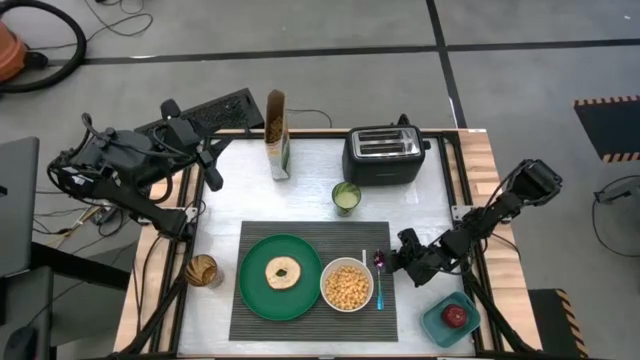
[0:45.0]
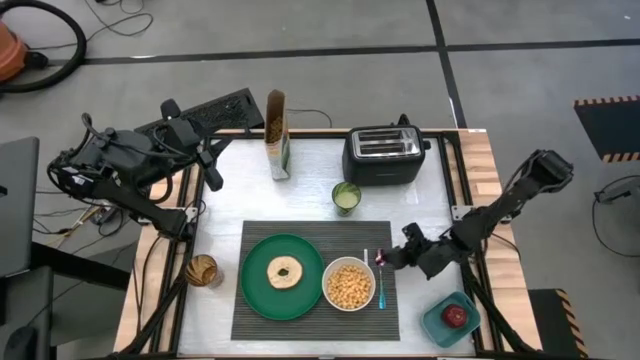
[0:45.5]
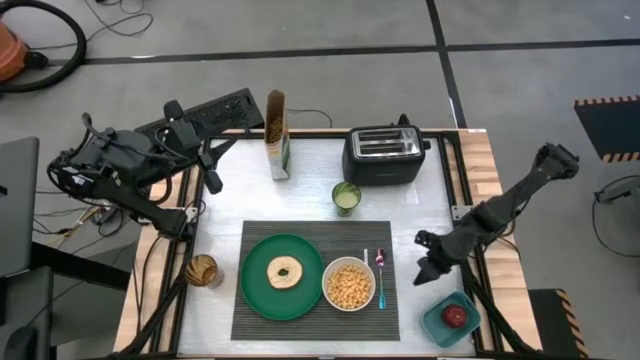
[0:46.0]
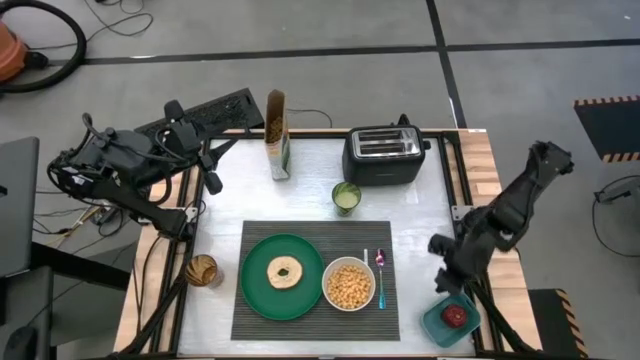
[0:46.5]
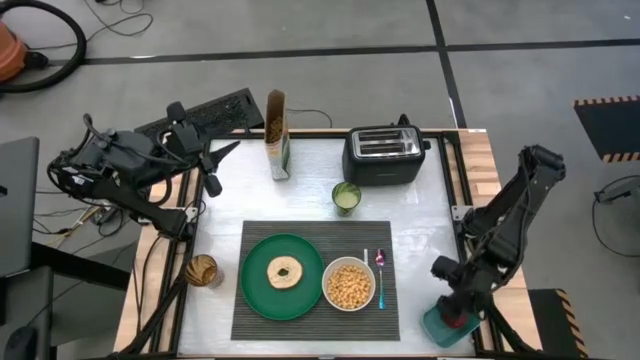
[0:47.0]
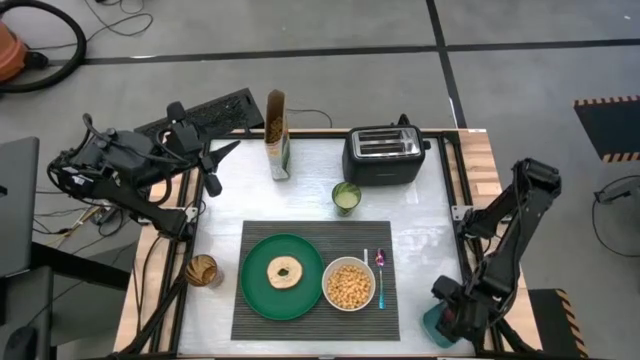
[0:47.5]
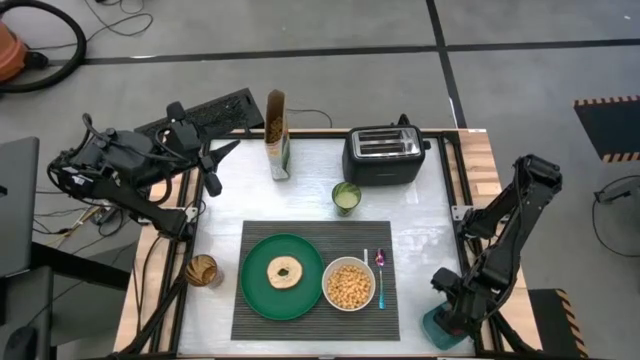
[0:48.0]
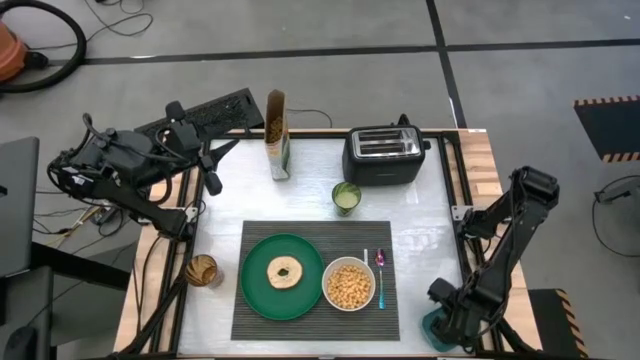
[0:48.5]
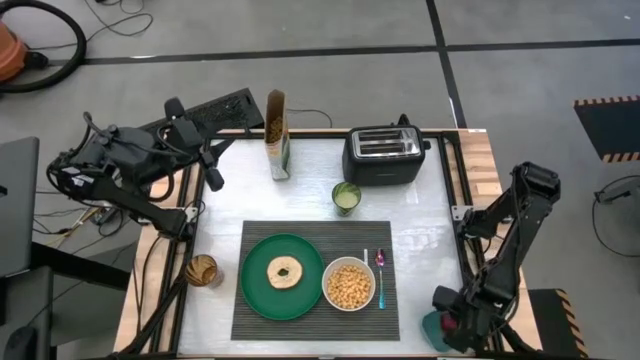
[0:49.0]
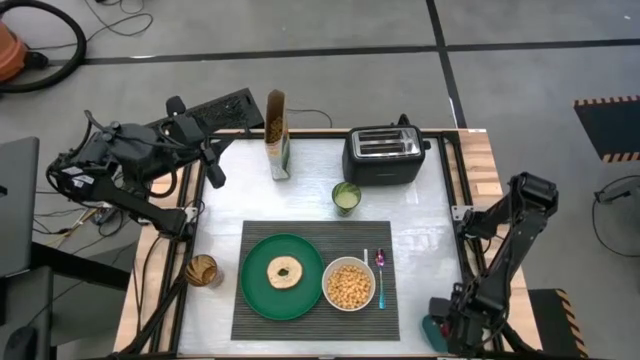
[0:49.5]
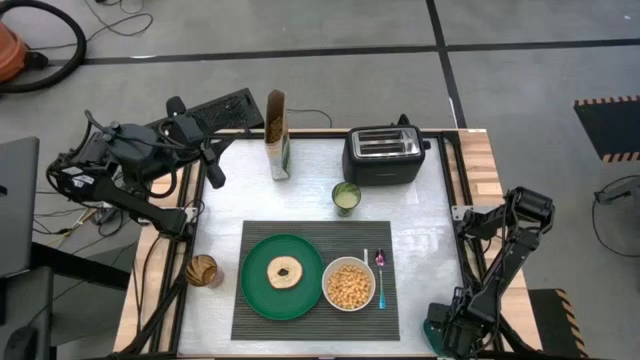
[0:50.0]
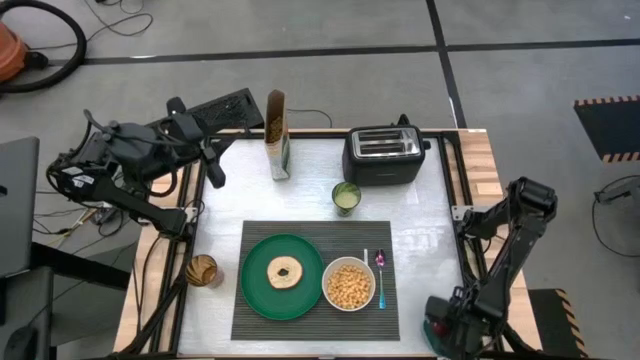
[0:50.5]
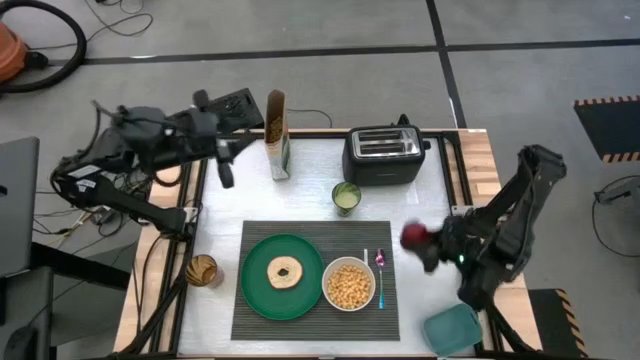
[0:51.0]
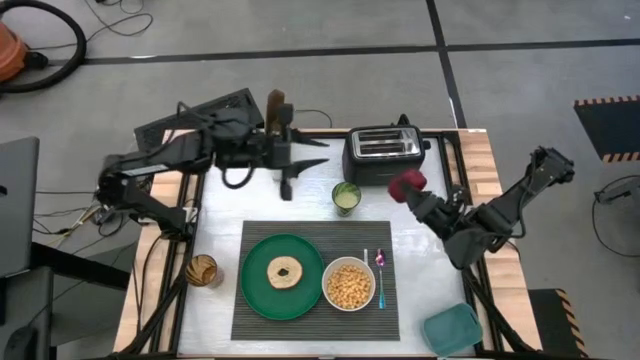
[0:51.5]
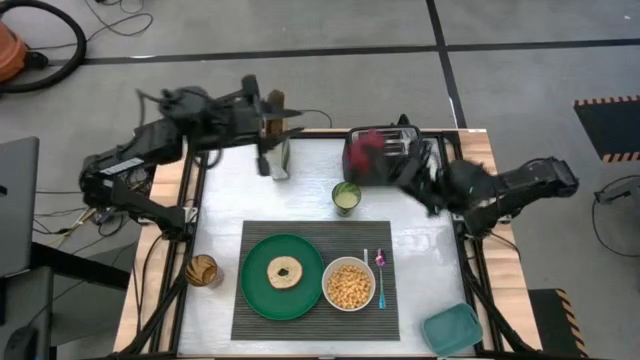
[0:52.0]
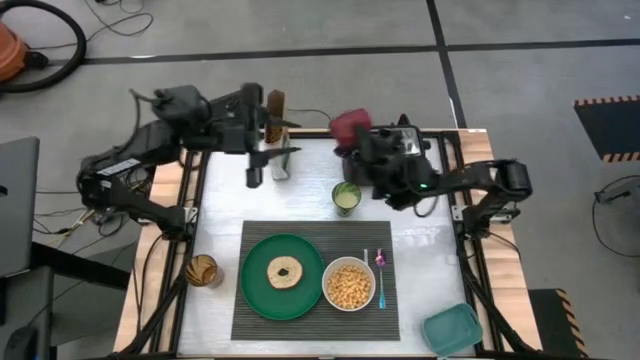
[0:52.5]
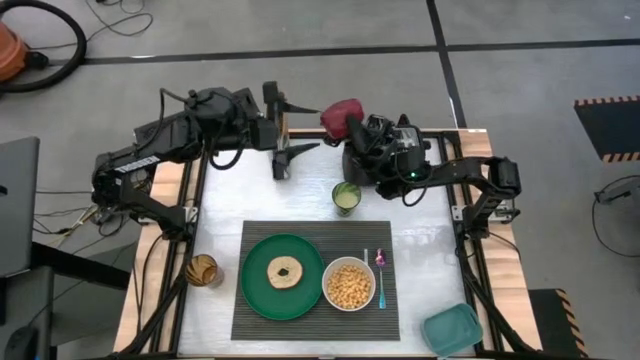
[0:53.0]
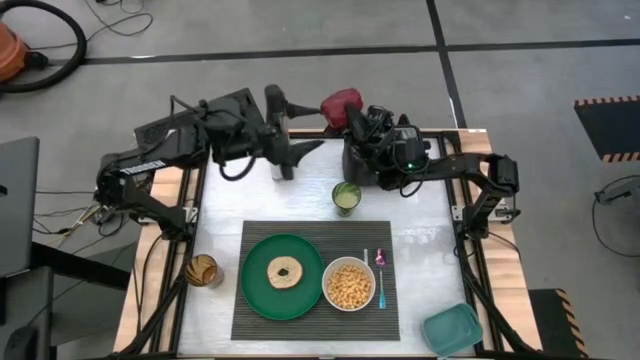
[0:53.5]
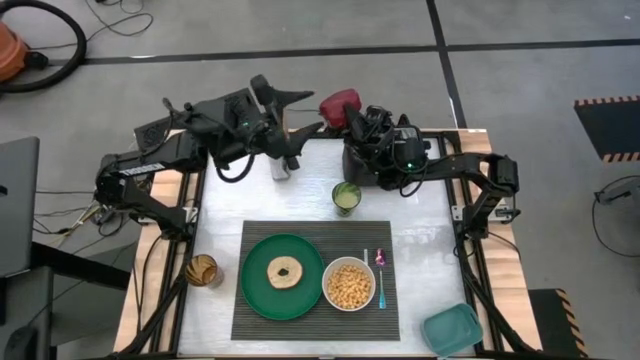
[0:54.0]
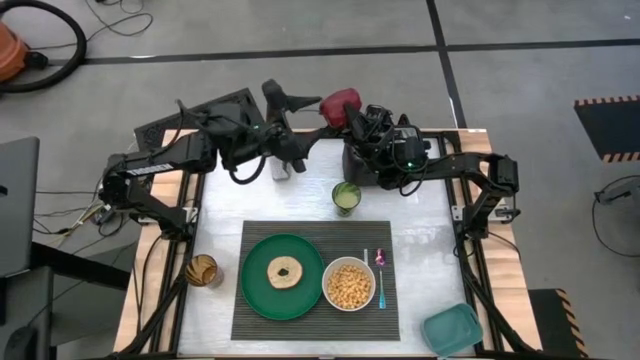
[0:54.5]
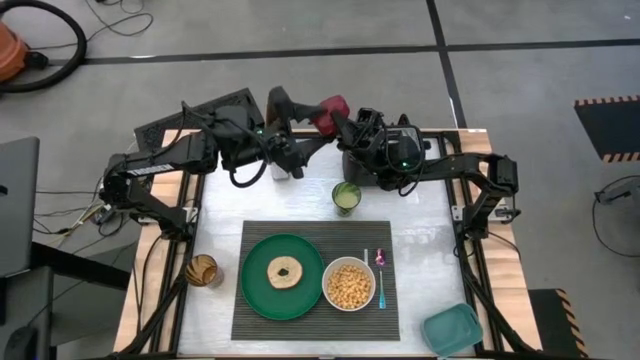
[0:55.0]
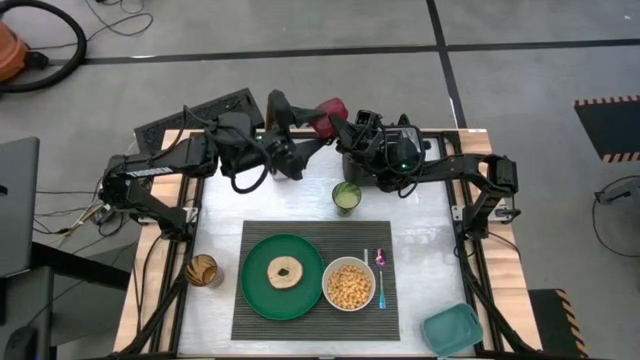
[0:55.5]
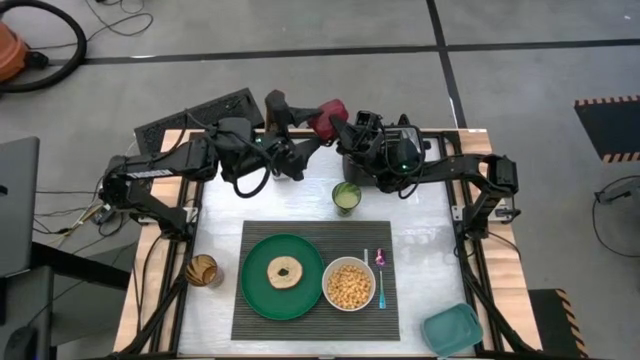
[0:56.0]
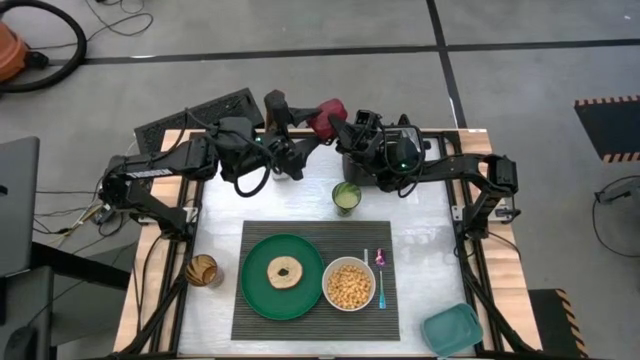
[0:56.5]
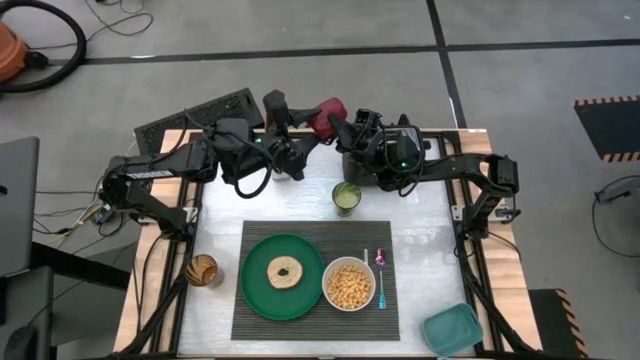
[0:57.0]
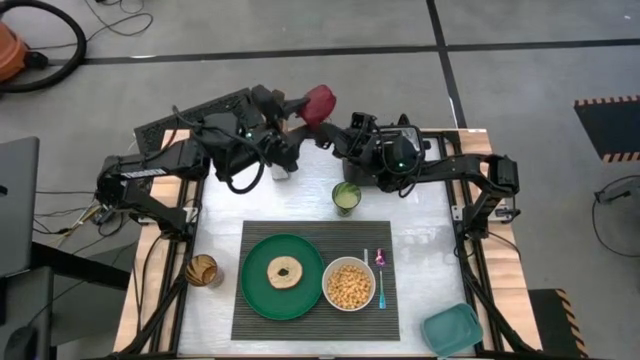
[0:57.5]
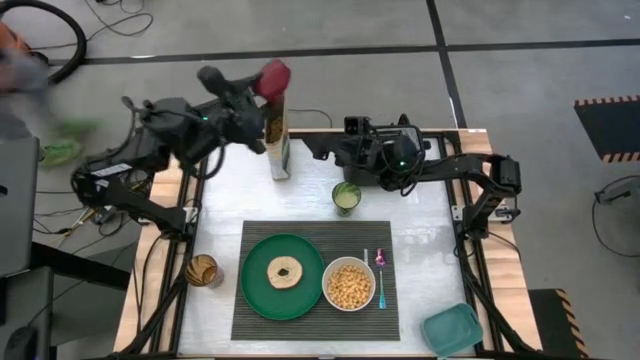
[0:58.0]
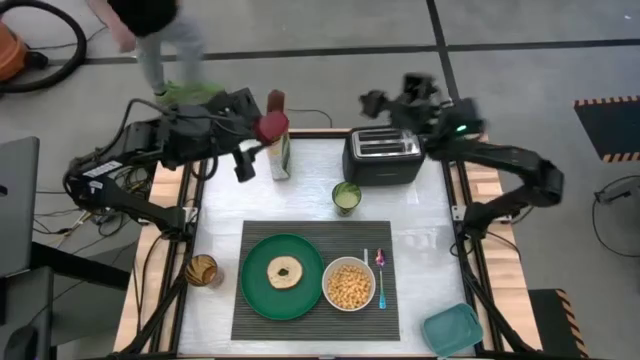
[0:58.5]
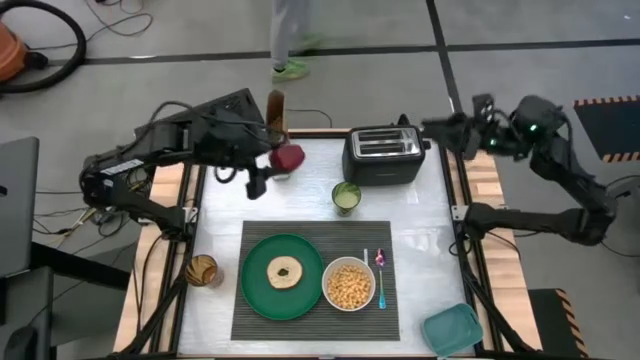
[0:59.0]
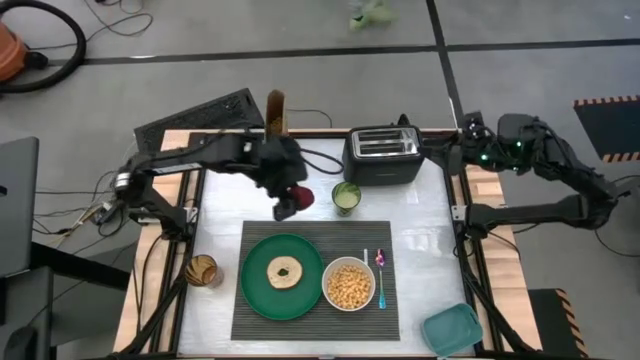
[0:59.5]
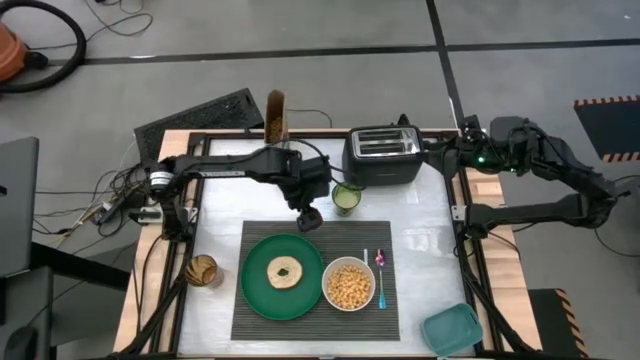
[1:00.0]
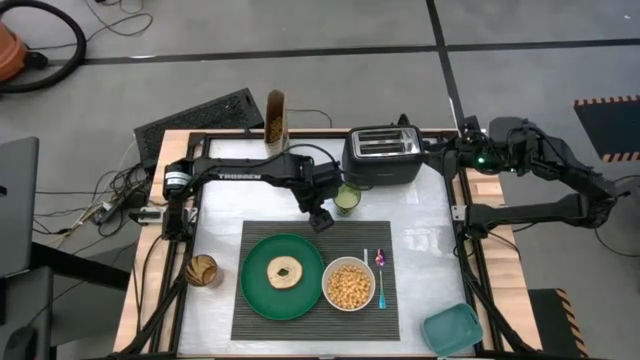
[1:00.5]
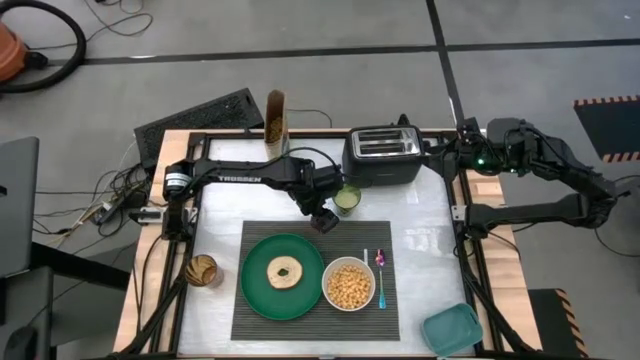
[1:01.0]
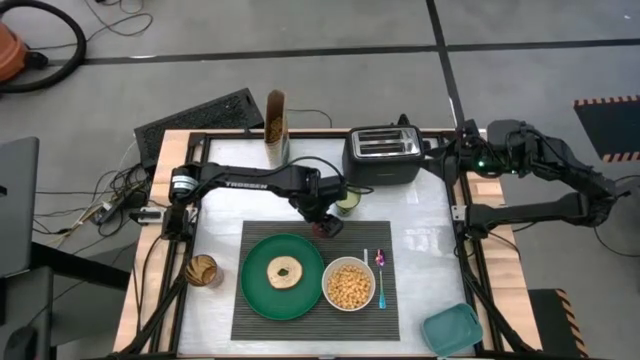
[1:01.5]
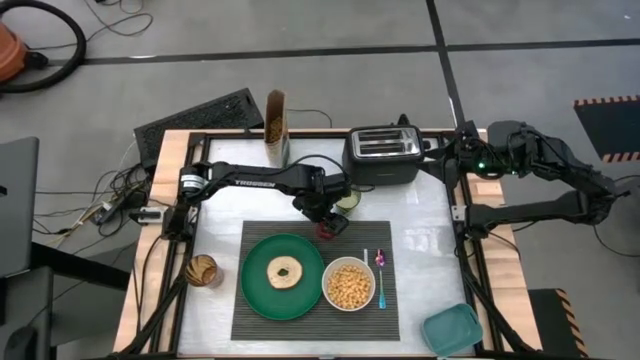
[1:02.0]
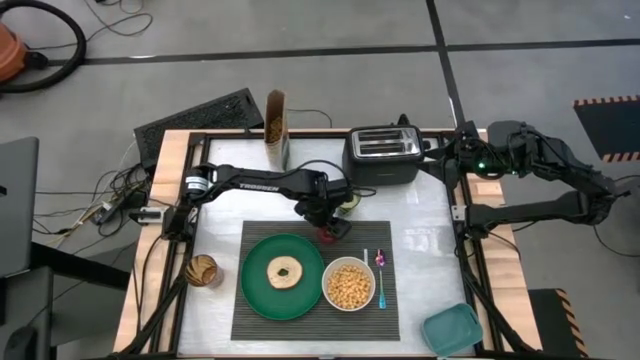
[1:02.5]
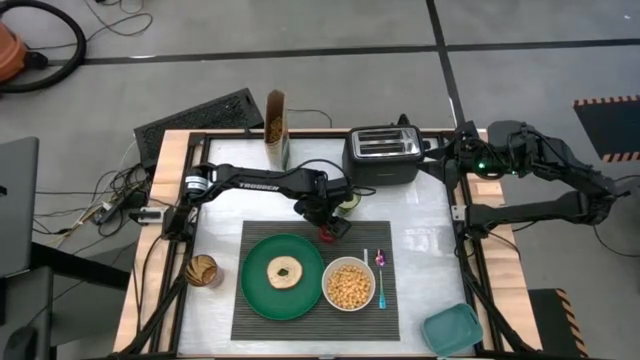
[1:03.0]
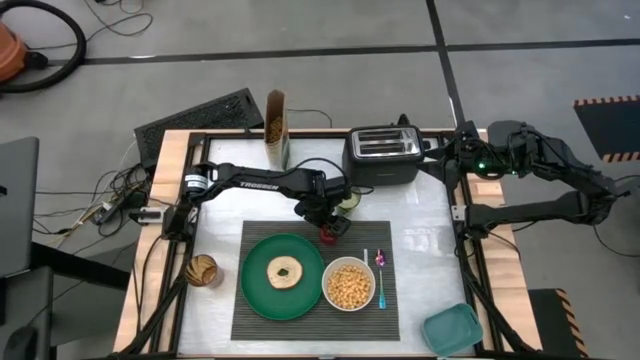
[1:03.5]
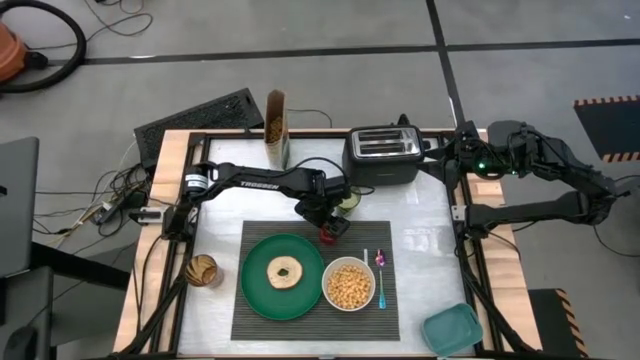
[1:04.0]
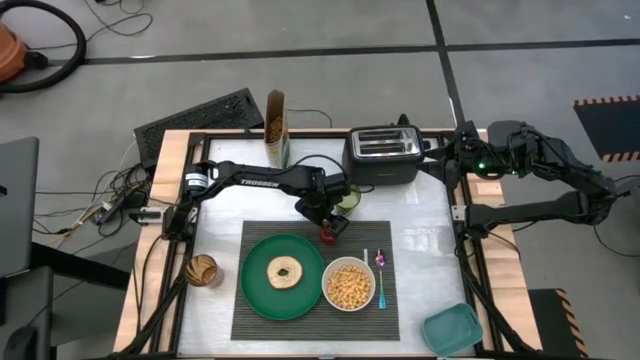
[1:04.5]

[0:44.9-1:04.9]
Task: Arrange a breakfast setting
Put the apple on the black placemat at the top right of the green plate

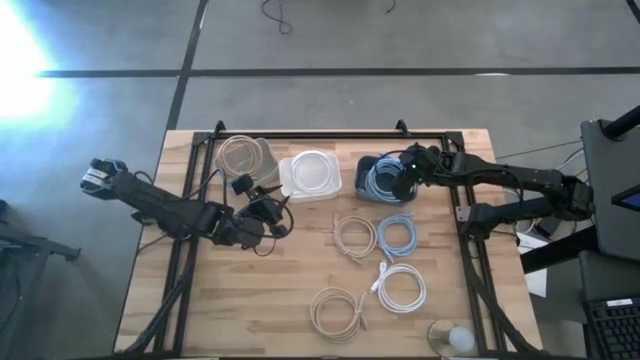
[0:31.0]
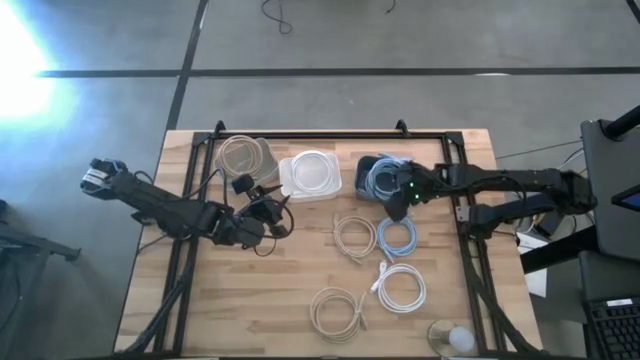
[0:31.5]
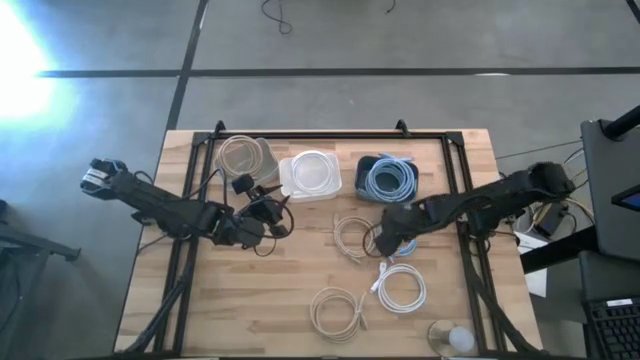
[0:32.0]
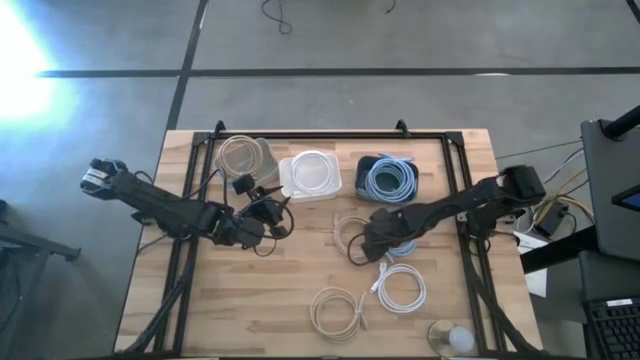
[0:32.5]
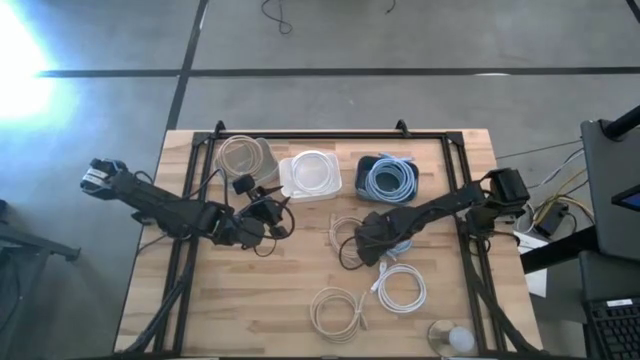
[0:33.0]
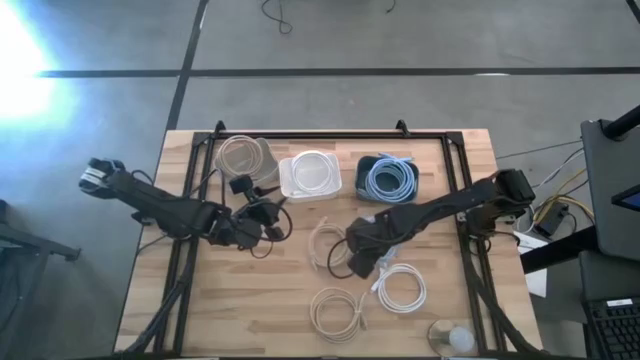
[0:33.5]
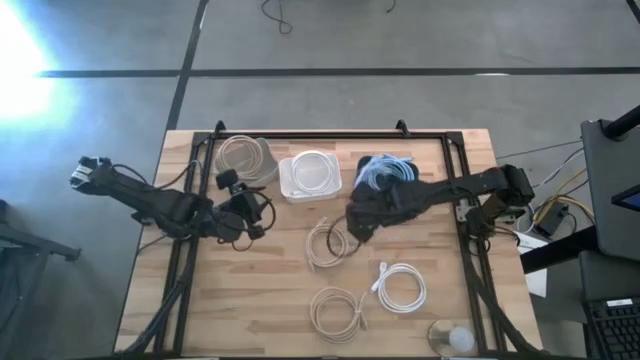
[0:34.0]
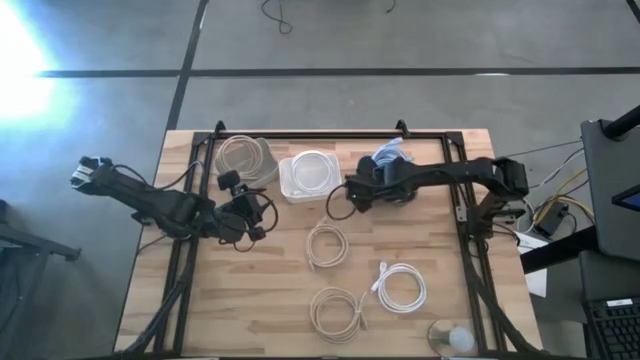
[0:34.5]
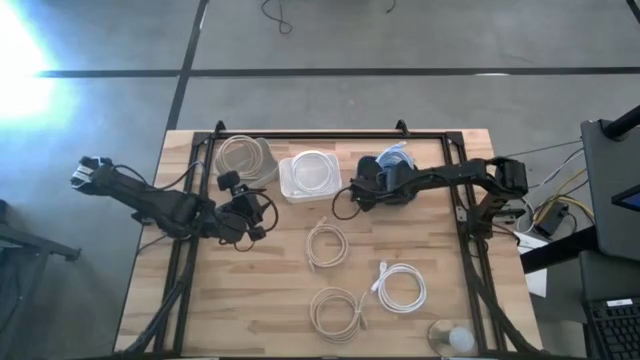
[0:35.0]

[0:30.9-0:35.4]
Task: Sort HDMI cables
Put the light blue HDMI cable into the blue bin
